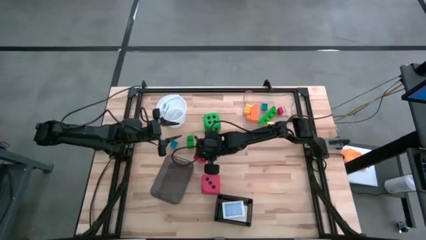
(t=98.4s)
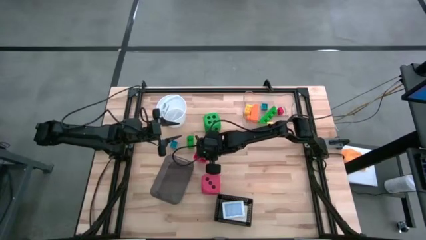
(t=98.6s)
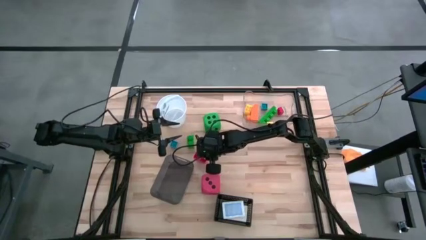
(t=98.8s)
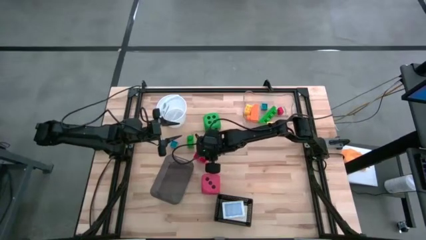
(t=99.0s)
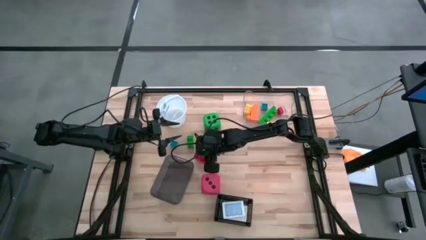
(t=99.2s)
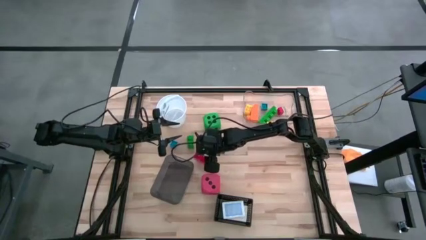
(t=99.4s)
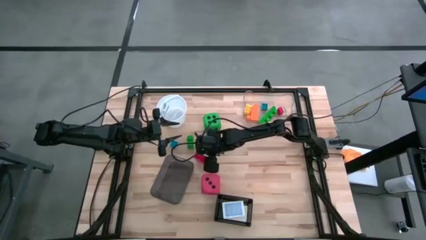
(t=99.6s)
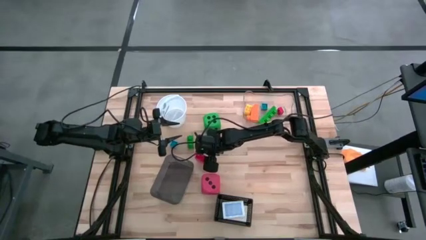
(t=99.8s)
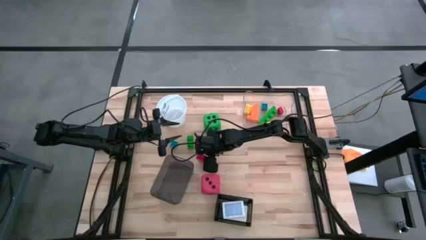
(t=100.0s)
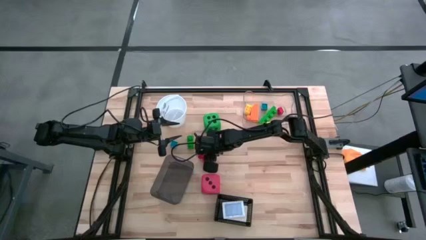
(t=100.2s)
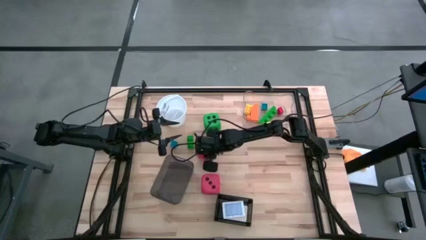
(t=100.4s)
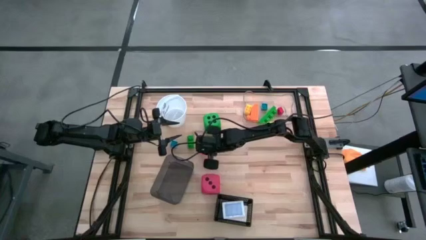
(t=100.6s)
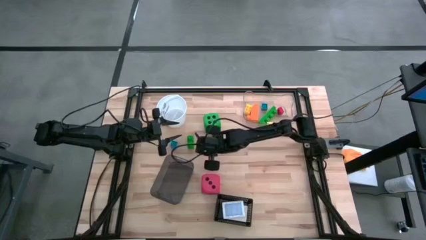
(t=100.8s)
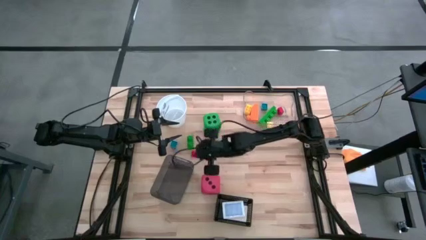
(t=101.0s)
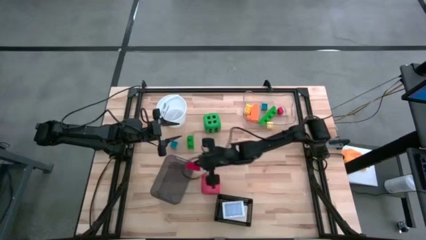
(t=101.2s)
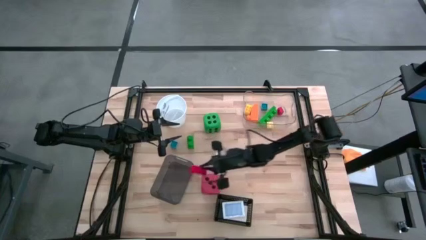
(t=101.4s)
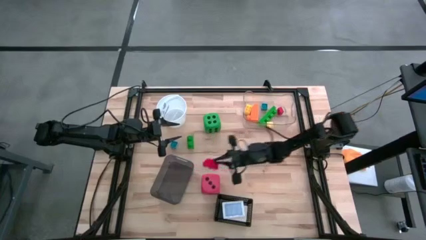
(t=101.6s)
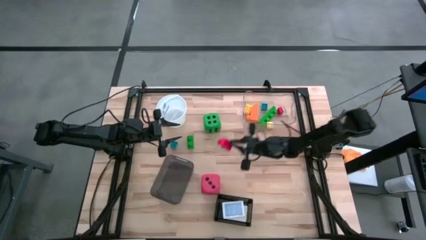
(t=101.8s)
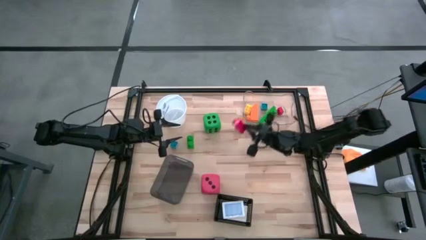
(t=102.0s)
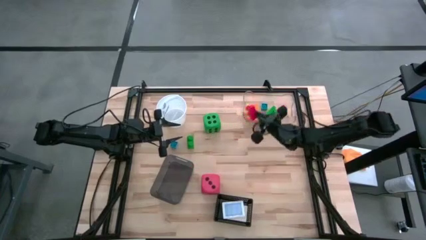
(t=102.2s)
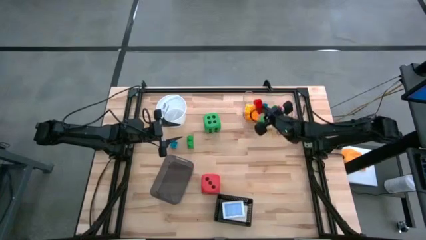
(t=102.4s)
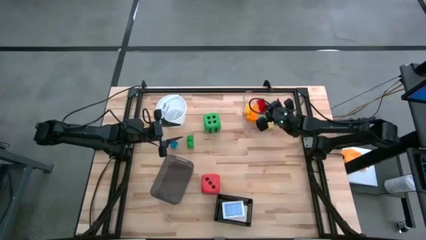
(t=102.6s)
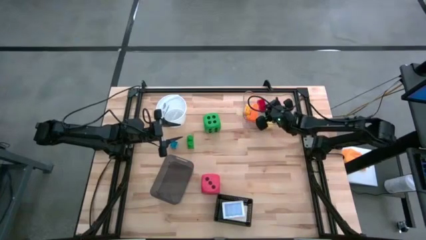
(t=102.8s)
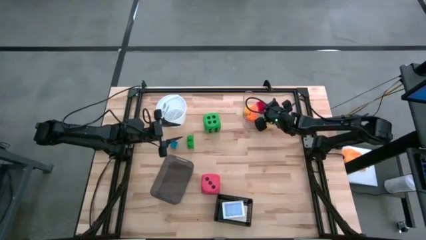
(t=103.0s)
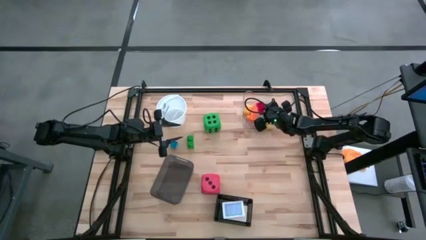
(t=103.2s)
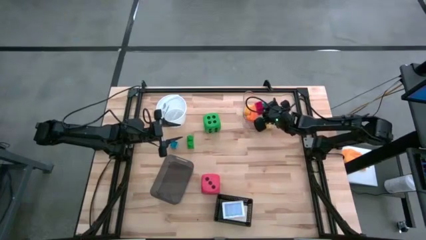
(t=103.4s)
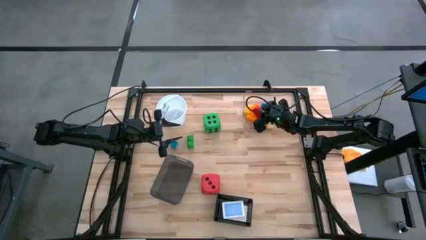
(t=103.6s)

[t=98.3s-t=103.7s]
Task: Pick & Place Toys
Put the red game piece into the transparent bin

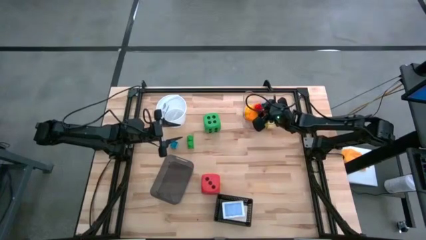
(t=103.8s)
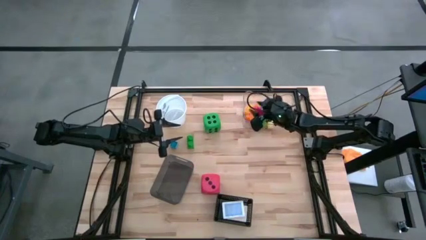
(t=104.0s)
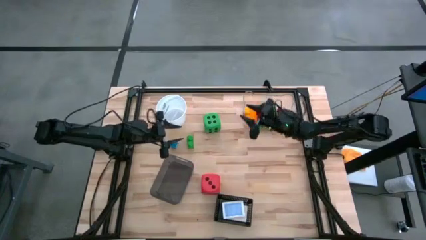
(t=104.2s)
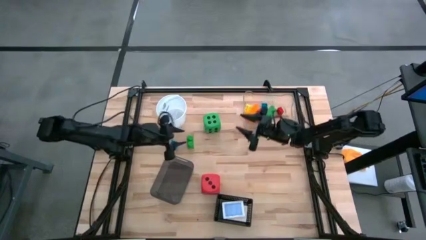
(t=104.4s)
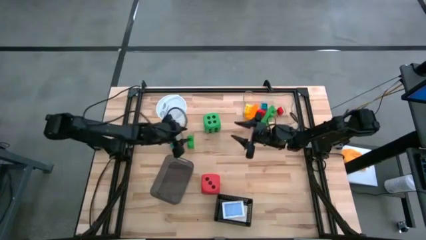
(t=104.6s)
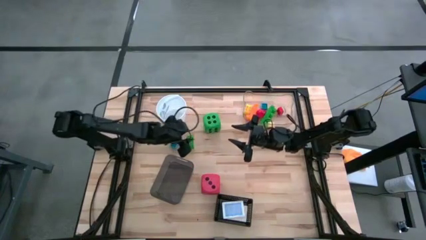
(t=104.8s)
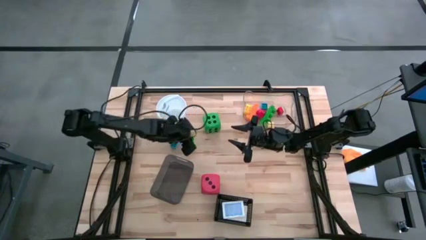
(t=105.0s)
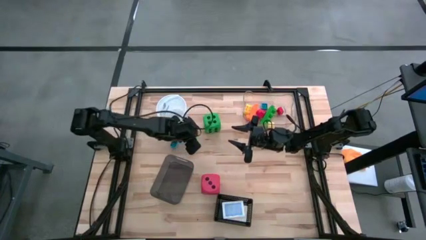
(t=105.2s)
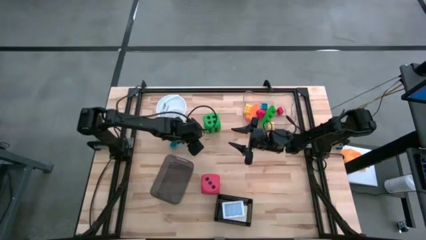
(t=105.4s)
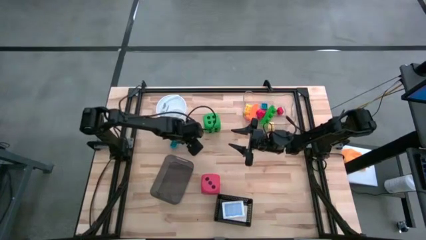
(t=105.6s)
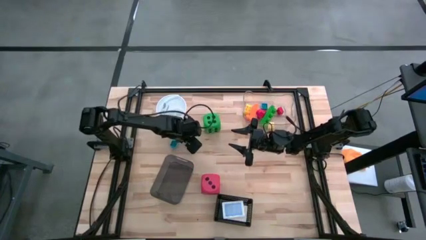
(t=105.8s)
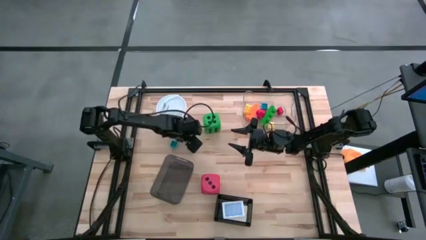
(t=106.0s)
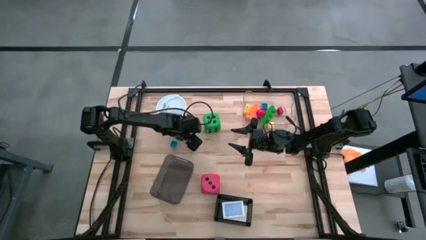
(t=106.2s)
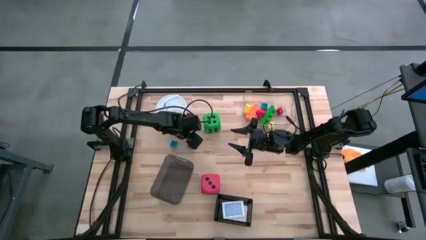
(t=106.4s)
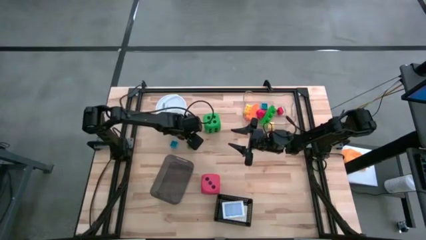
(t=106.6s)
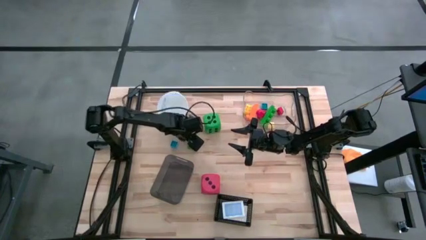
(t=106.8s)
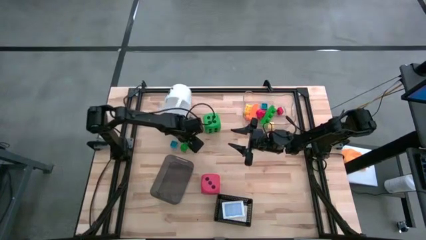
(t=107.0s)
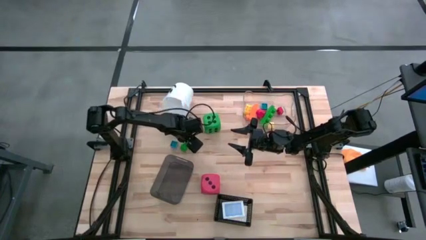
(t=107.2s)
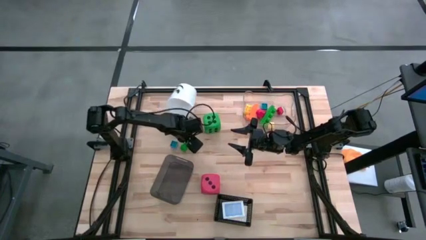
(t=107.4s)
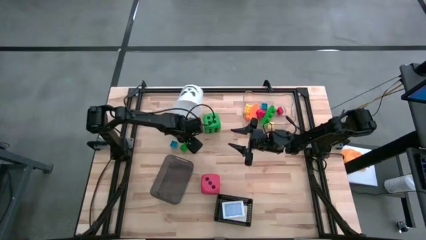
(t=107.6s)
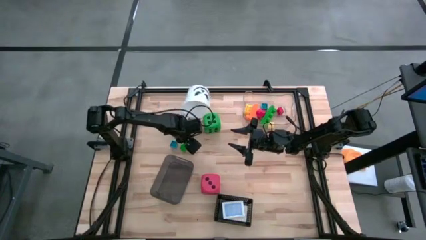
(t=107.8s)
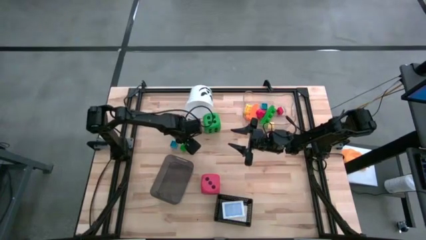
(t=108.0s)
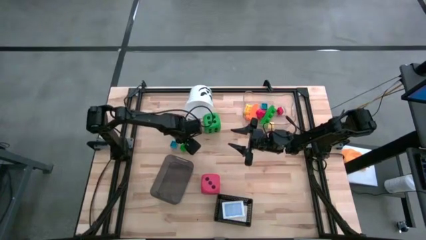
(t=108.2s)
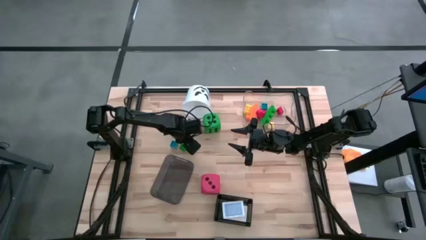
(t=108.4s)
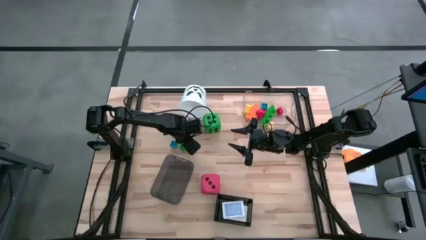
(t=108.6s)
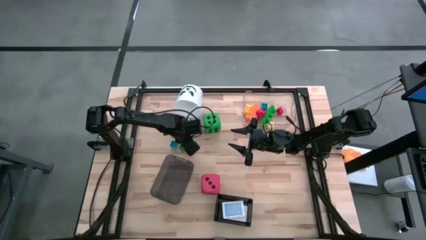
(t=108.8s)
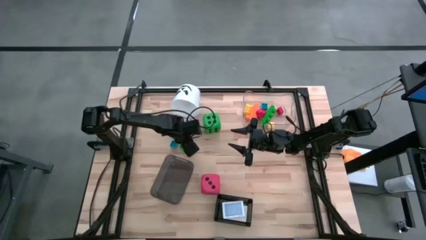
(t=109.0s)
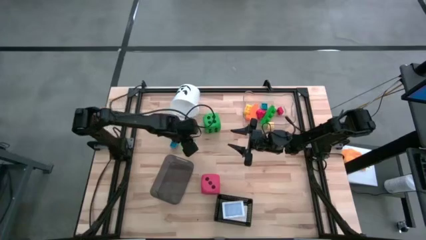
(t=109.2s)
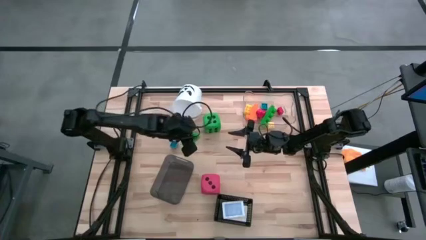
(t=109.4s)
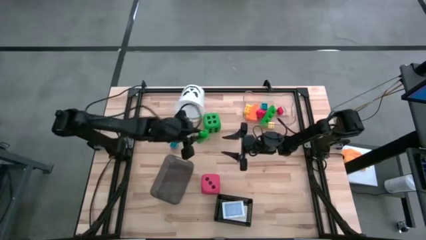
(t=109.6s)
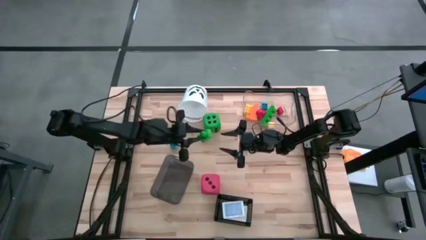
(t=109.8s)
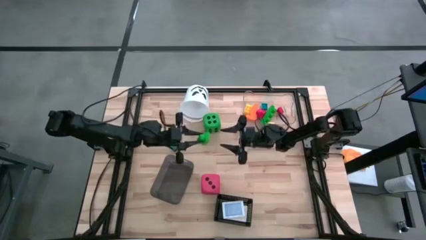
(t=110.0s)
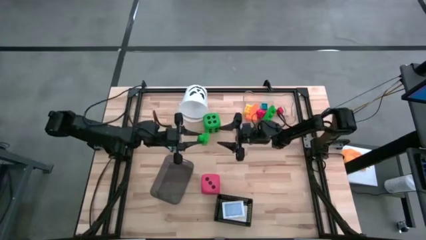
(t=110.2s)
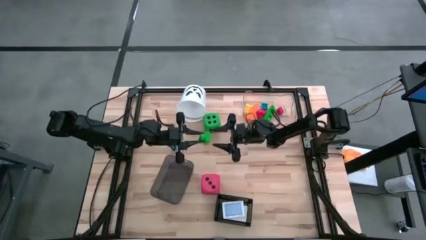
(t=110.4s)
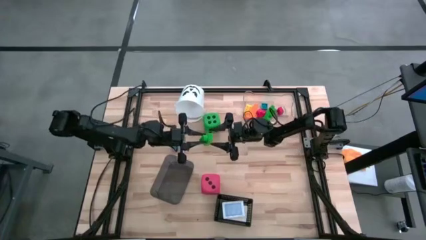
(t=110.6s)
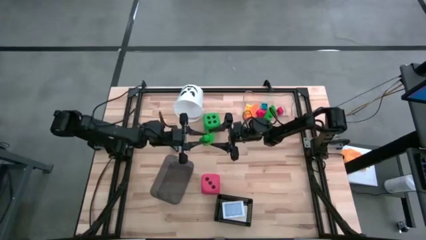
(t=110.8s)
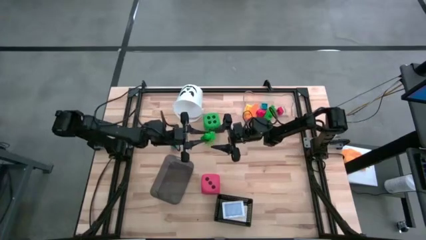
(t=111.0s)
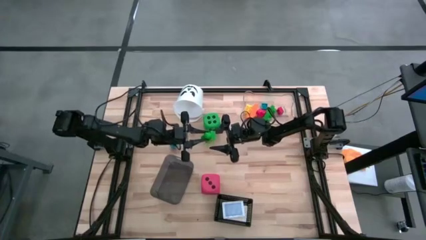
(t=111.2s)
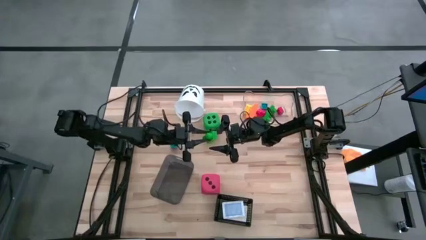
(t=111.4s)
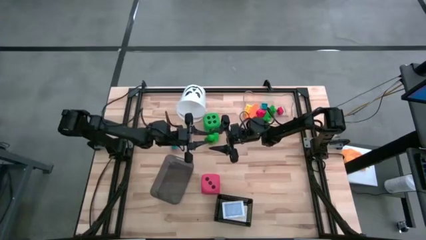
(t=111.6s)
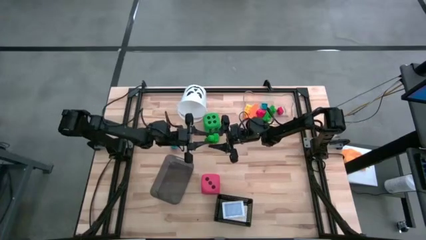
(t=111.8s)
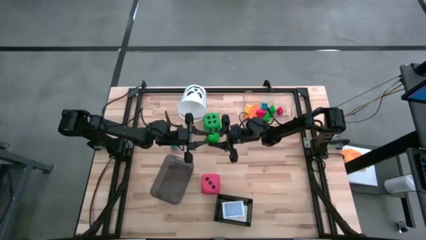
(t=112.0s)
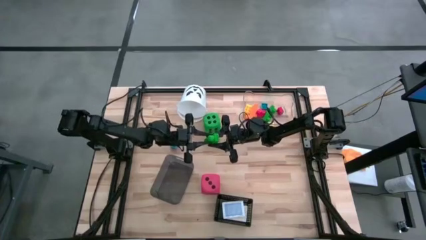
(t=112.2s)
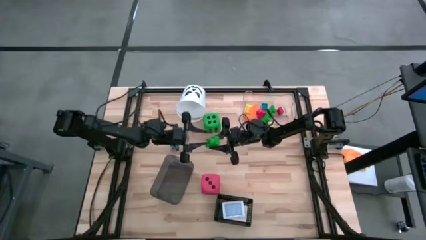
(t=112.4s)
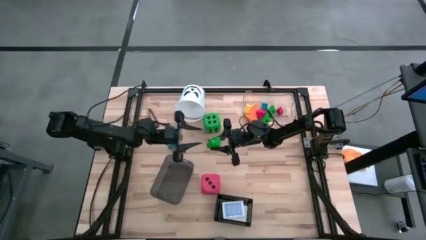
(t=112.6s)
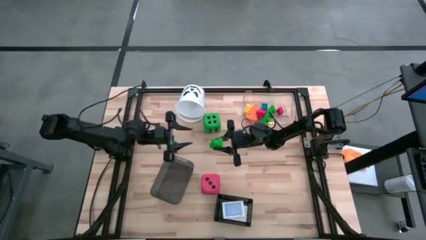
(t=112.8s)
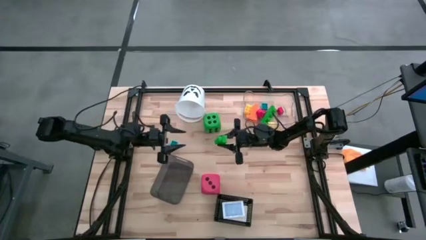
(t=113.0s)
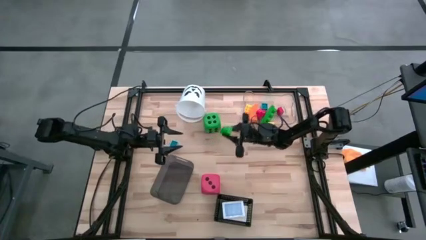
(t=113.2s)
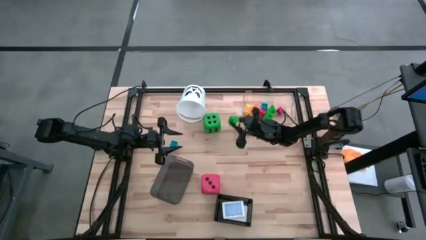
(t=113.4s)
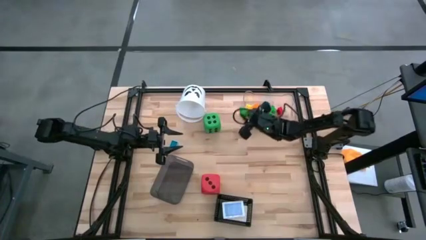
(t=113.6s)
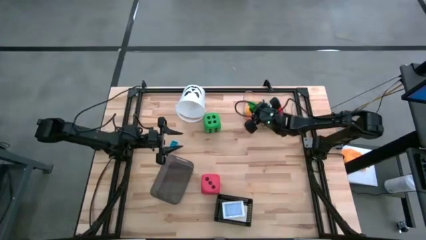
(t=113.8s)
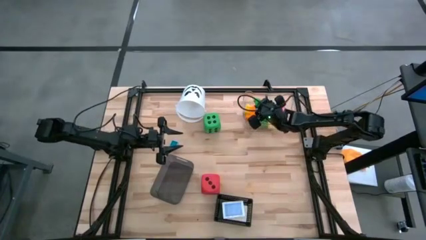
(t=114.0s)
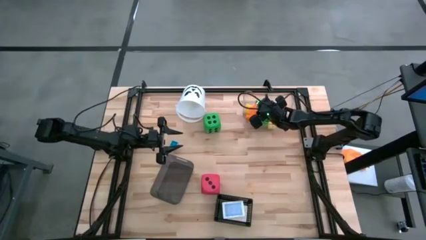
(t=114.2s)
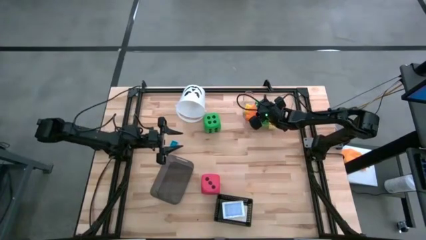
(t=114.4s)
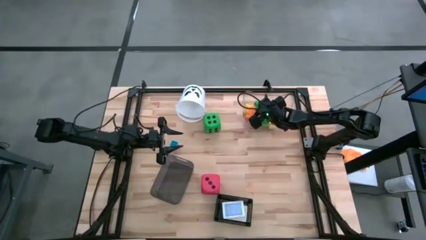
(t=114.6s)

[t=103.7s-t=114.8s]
Put the green game piece into the transparent bin
